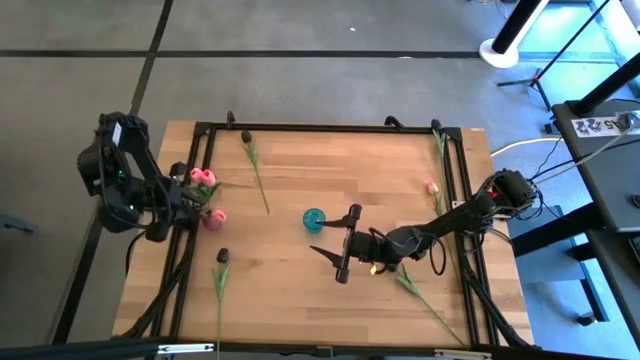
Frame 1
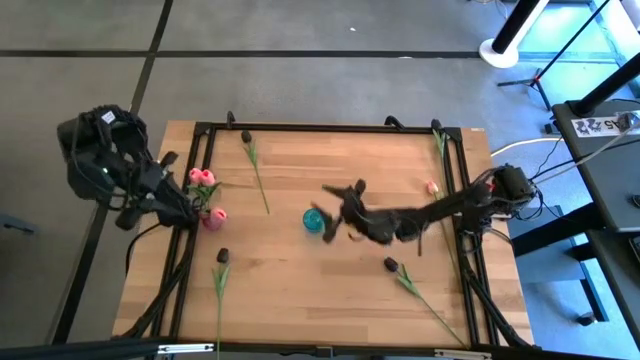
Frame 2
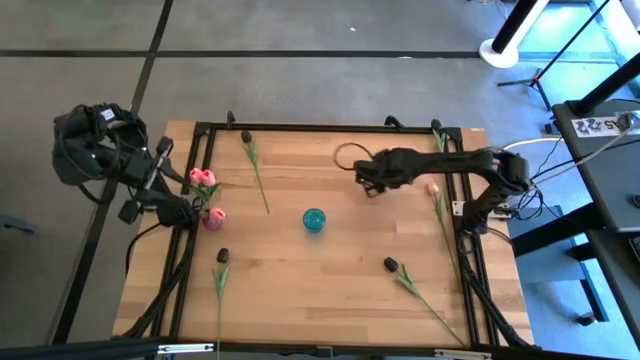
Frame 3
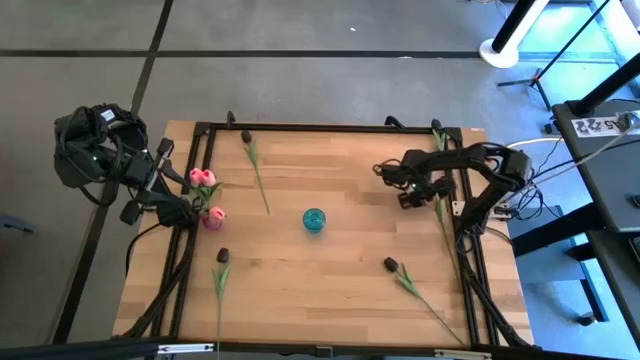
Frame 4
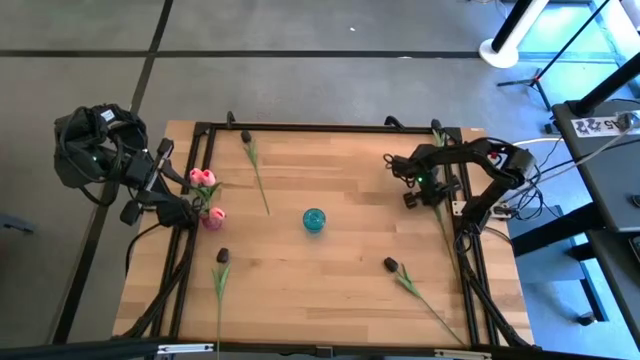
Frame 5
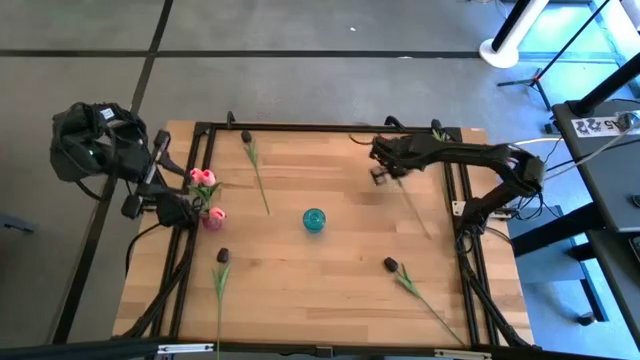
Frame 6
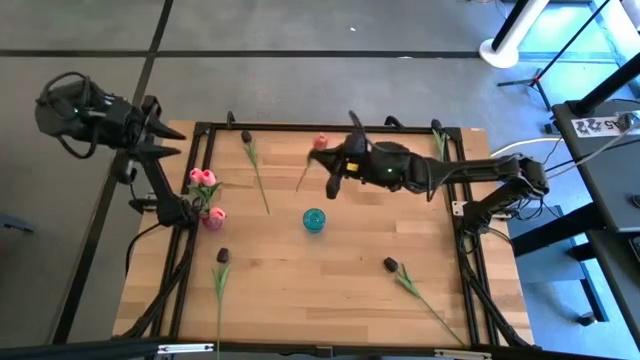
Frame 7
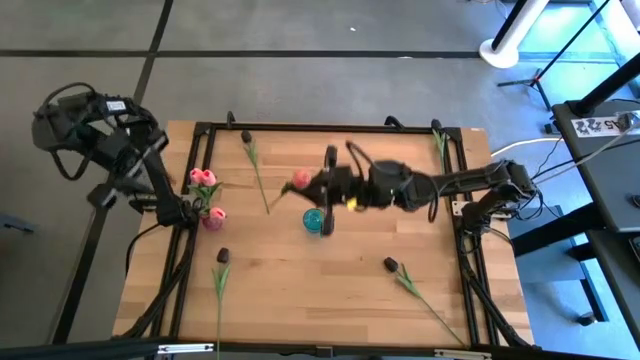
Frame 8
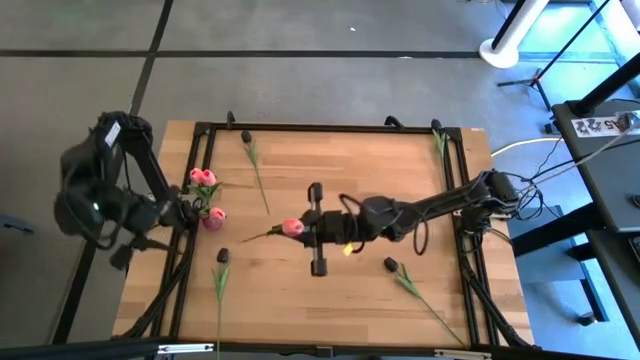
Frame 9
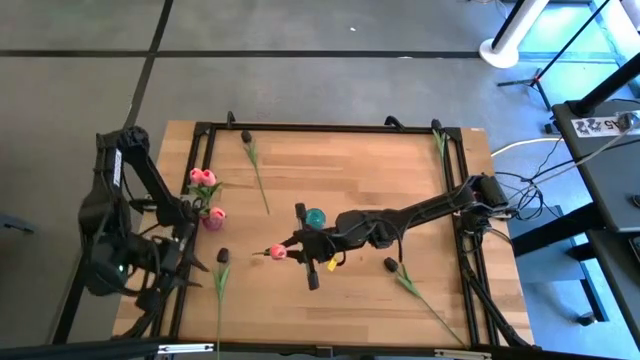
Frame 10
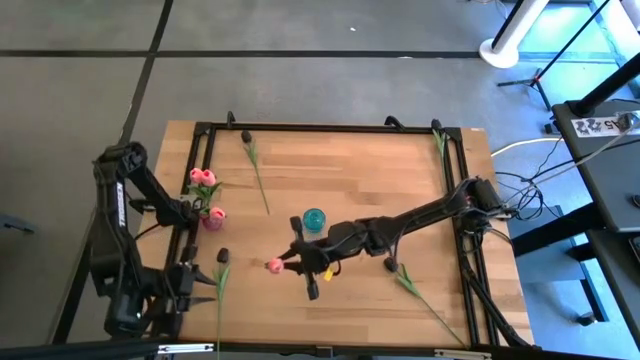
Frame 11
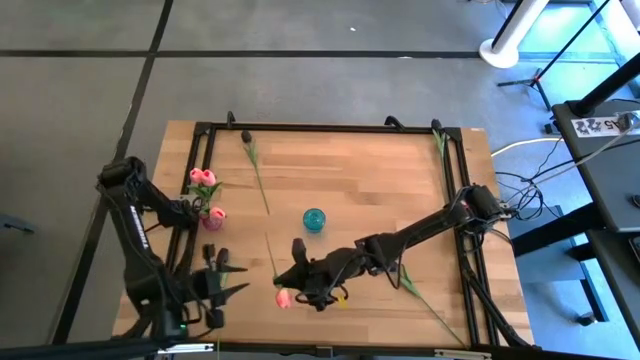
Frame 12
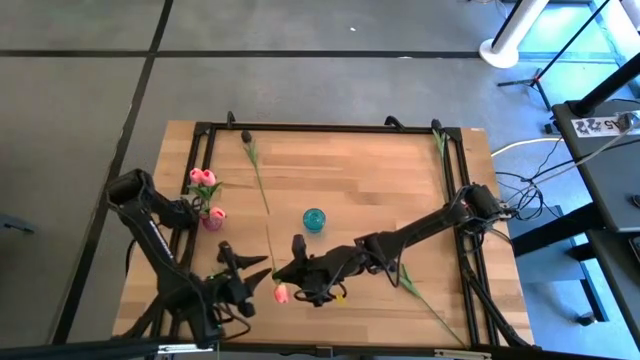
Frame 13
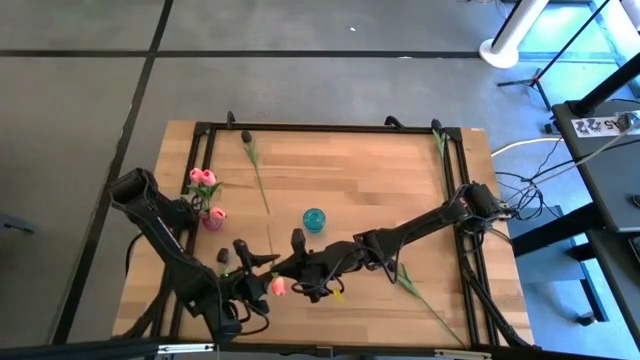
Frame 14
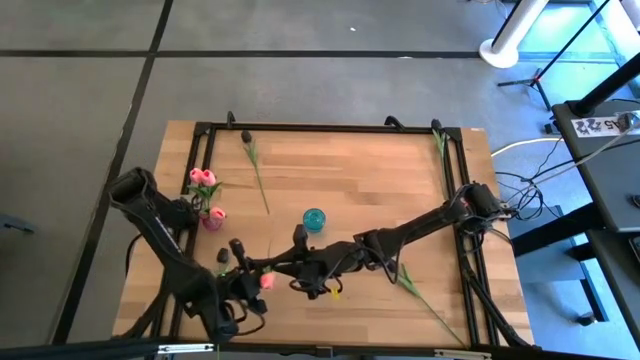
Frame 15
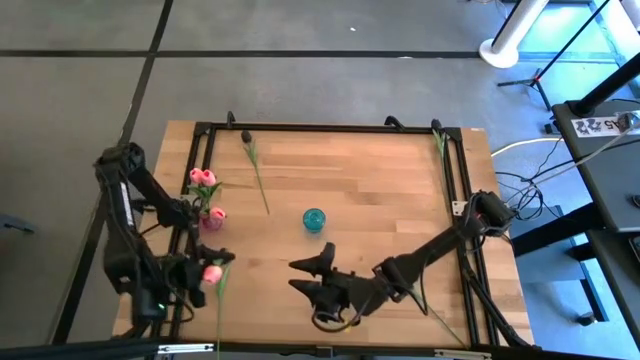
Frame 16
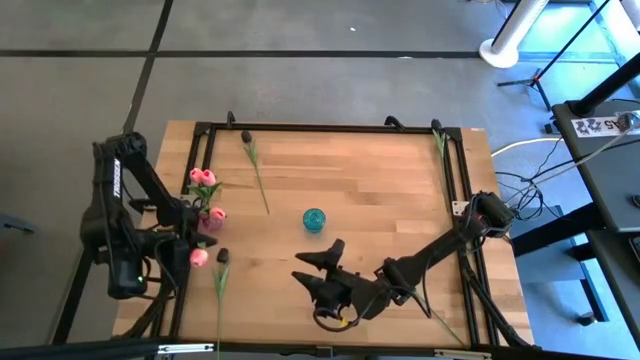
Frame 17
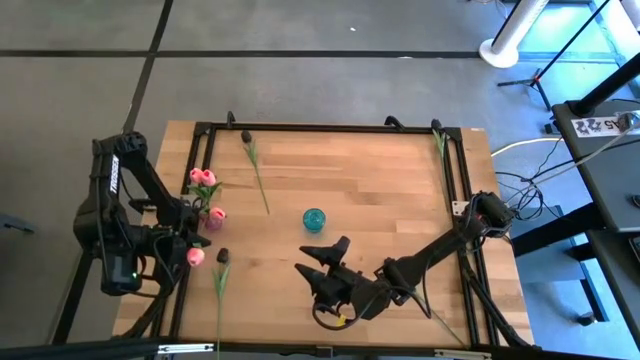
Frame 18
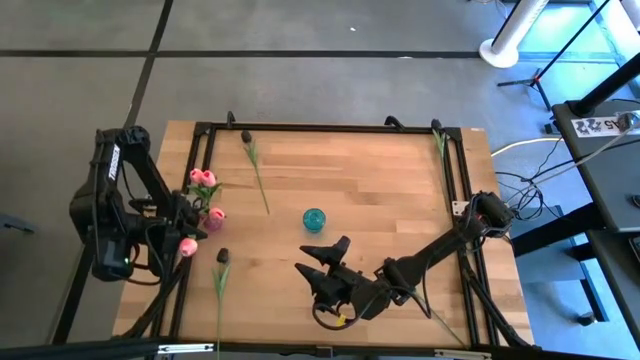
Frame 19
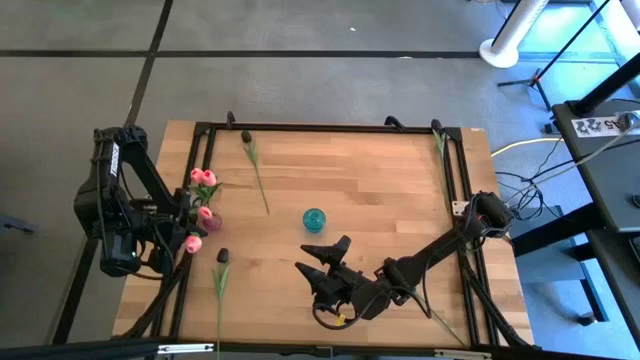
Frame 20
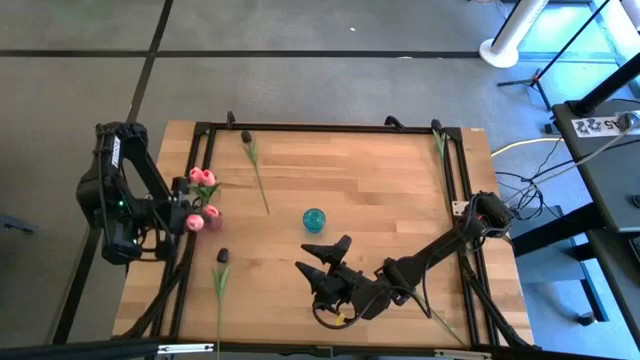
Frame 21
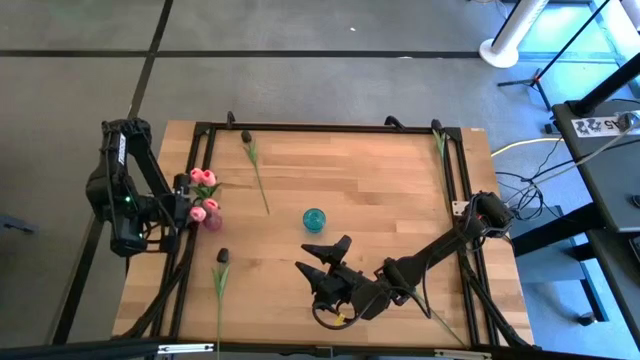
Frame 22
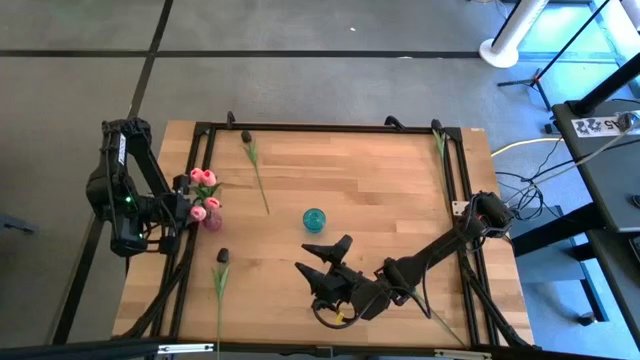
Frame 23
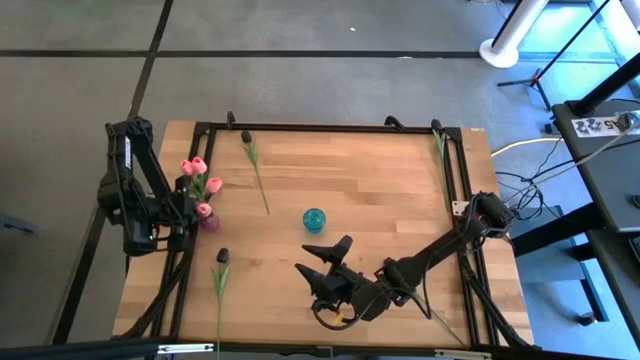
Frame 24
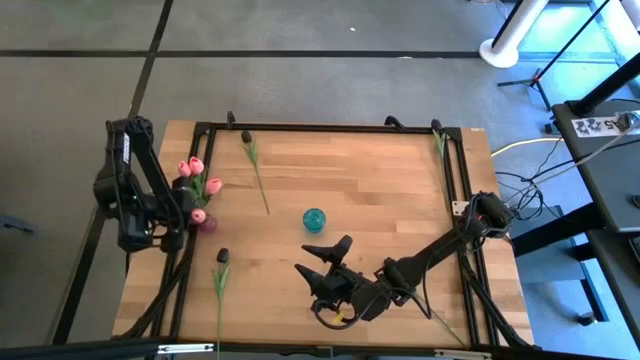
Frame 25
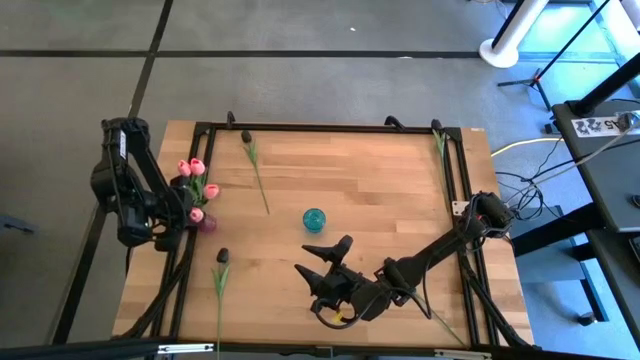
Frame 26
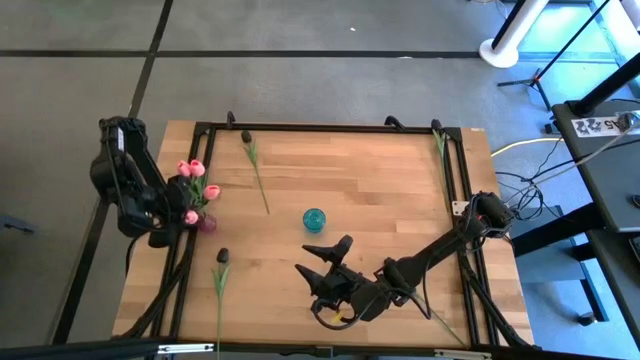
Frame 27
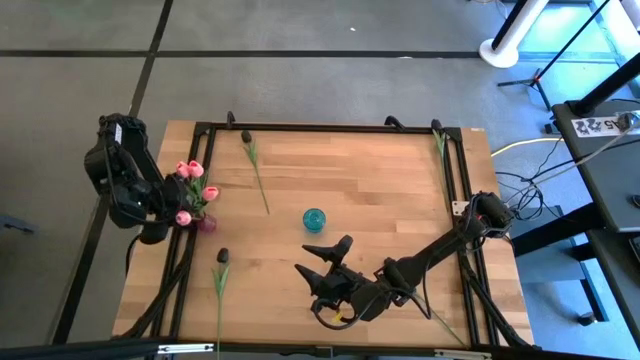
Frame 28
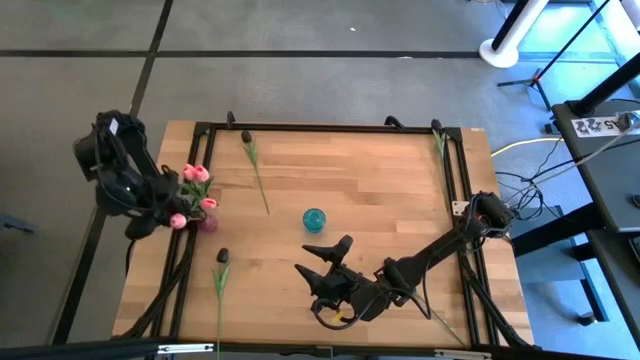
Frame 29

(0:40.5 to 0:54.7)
Task: Sort flowers into vase by color
Put the pink tulip into the purple vase

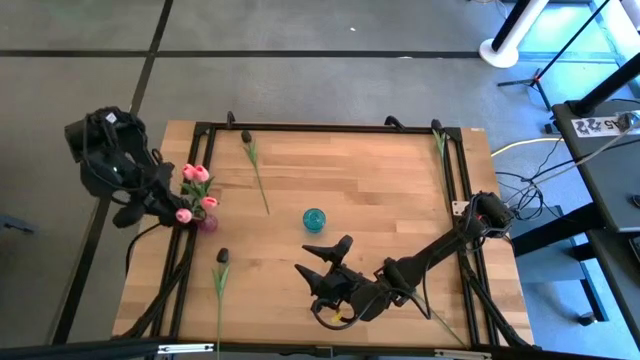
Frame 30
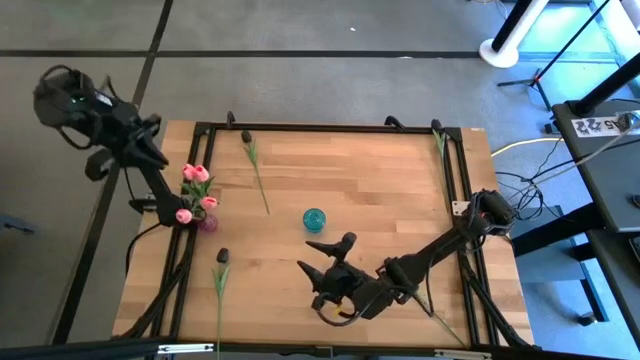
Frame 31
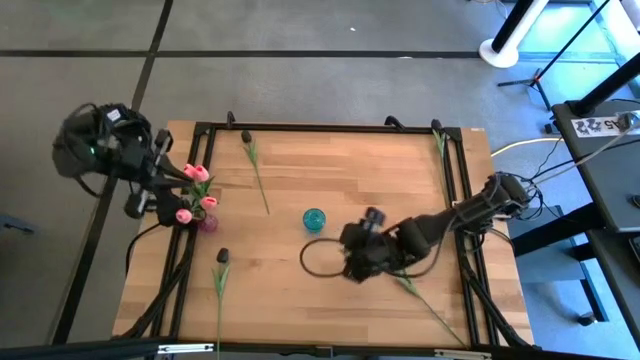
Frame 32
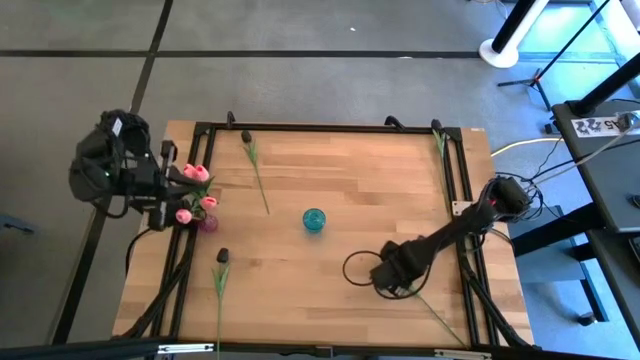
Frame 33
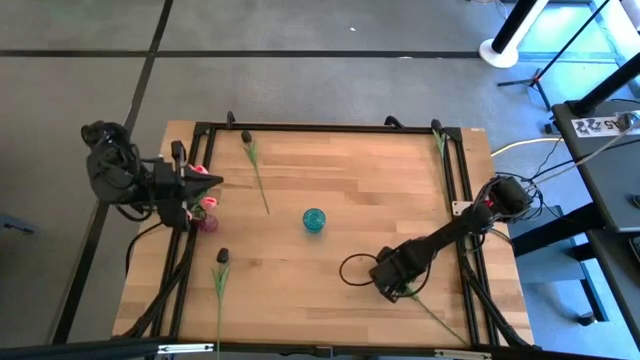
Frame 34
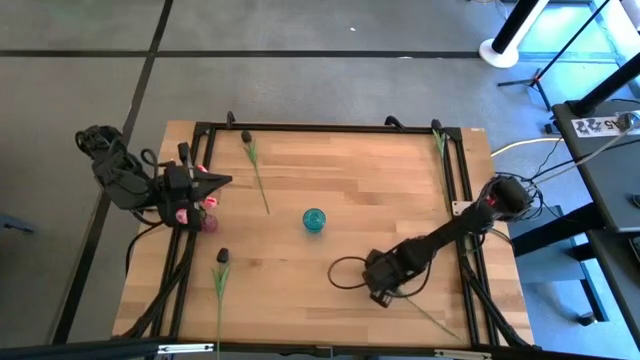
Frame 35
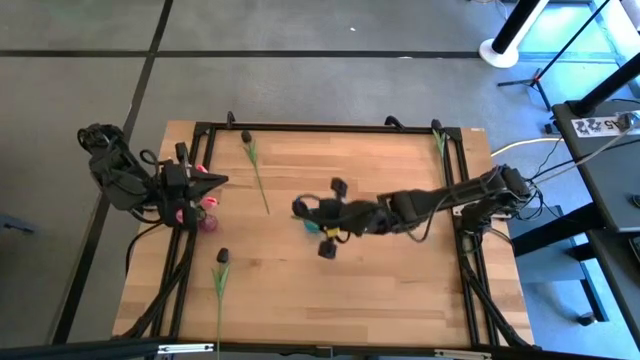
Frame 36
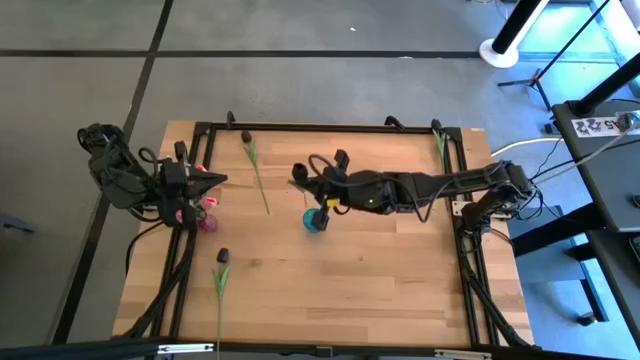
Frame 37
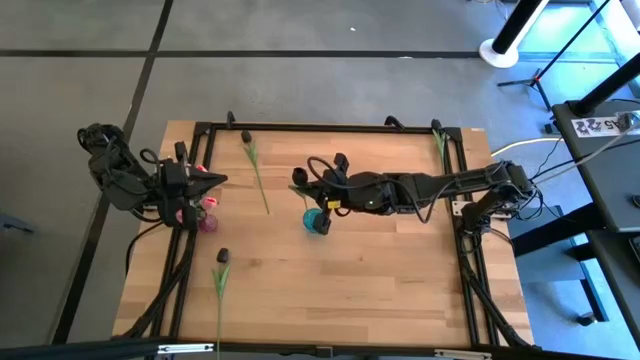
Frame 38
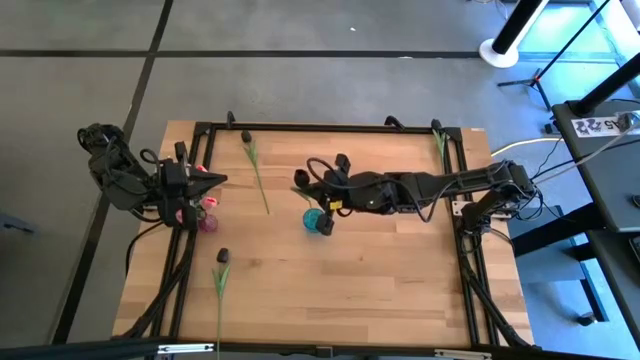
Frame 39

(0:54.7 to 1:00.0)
Put the bottom right black tulip into the blue vase

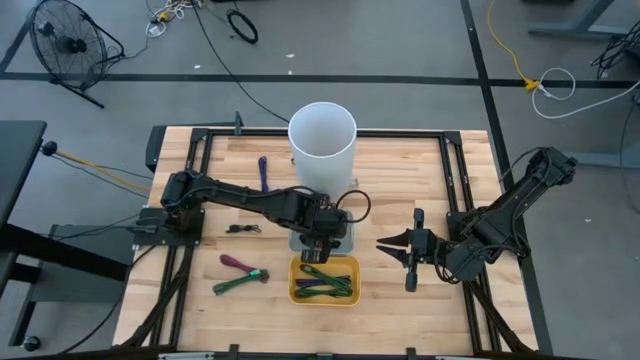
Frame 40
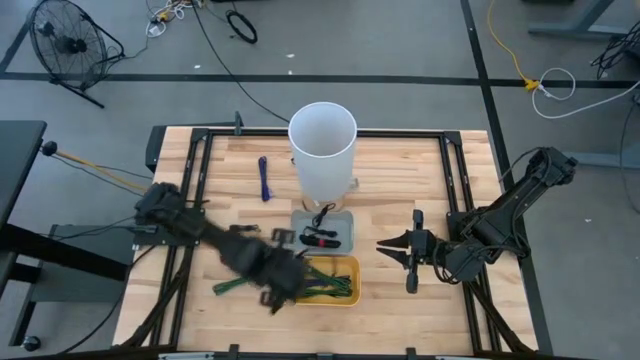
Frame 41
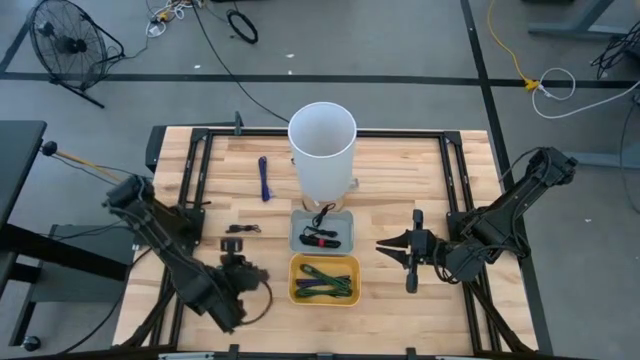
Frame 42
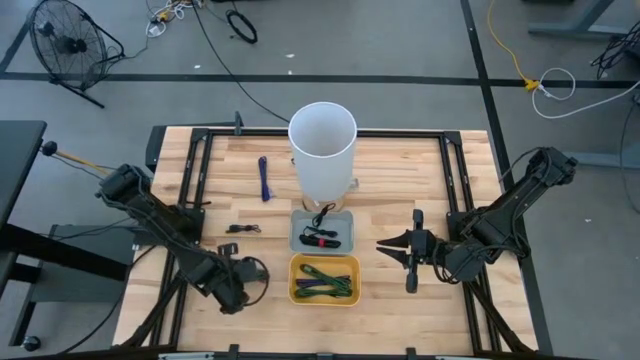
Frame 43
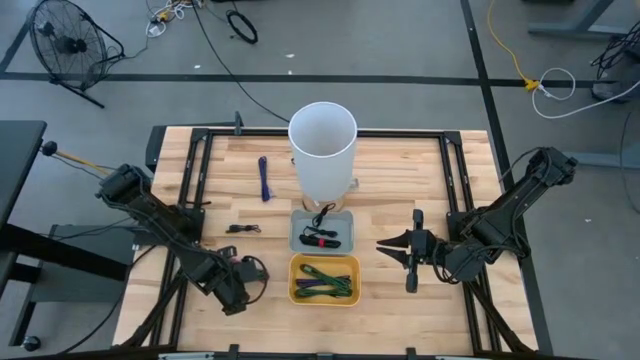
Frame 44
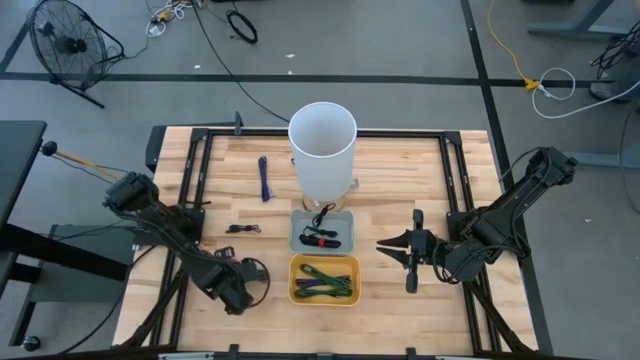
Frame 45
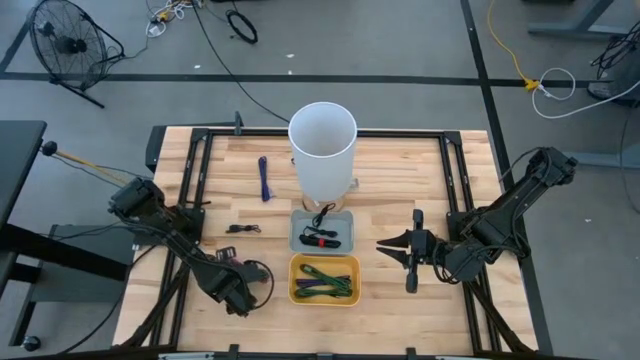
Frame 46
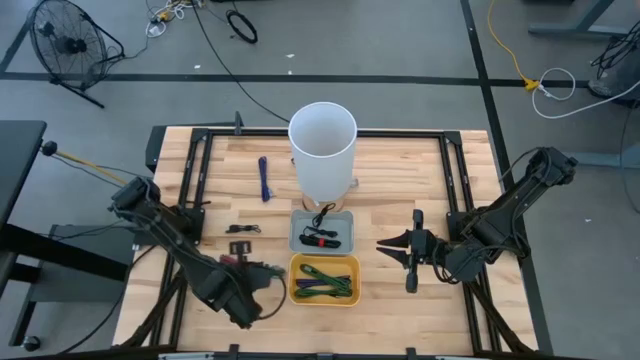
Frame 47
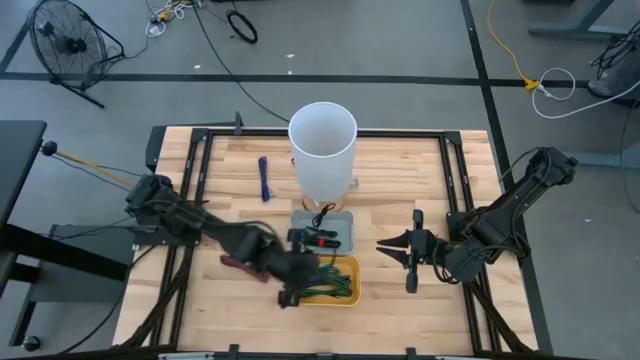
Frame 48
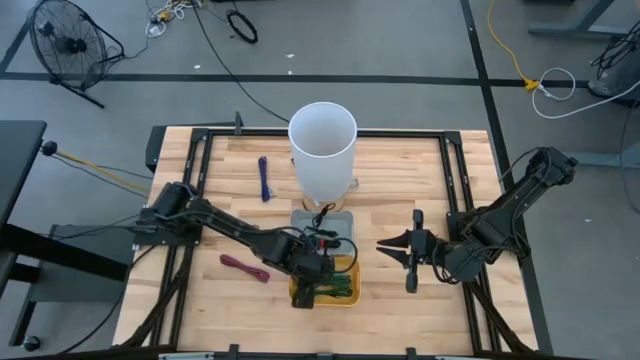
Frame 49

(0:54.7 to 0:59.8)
Task: Pick & Place USB Port
Put the green charger cable into the yellow bin
